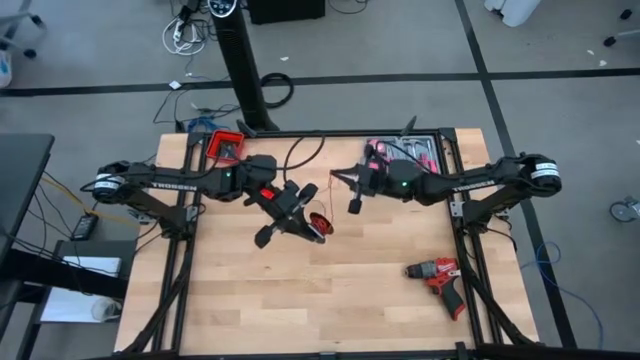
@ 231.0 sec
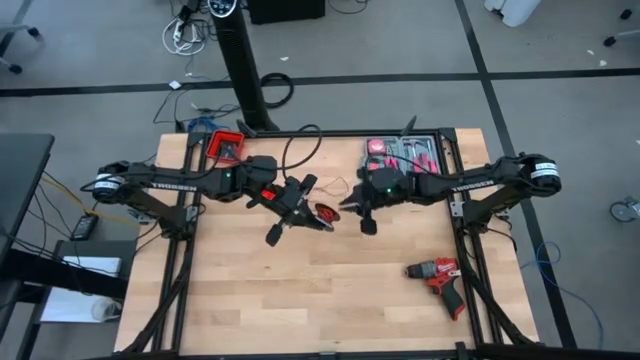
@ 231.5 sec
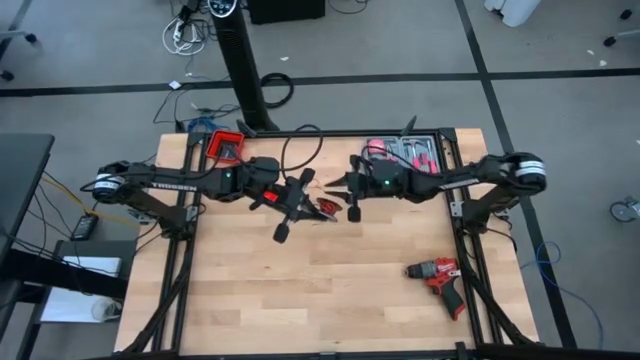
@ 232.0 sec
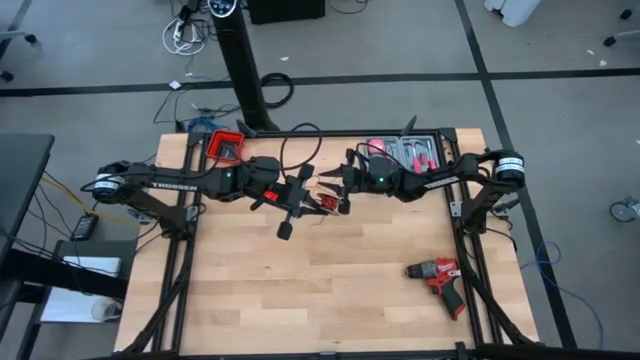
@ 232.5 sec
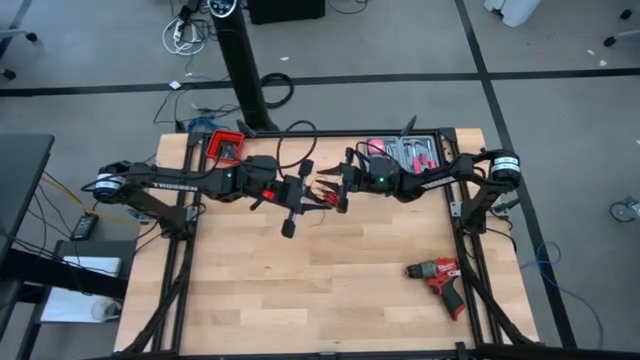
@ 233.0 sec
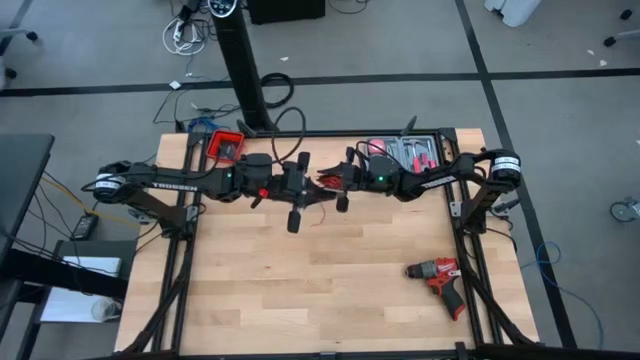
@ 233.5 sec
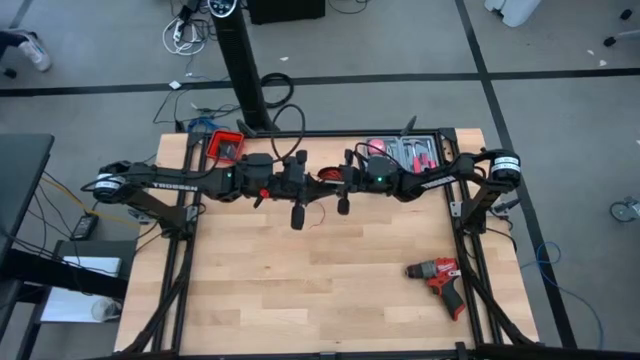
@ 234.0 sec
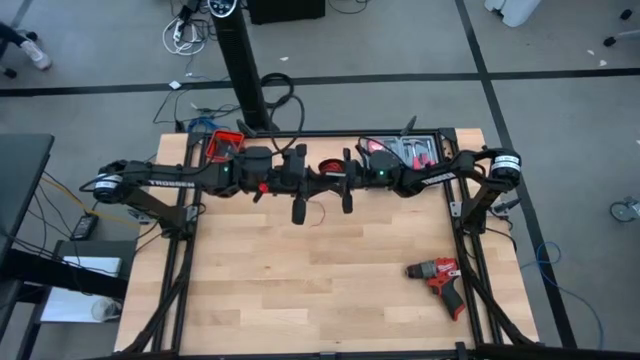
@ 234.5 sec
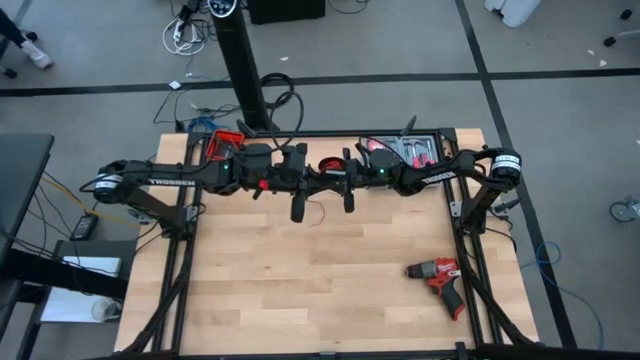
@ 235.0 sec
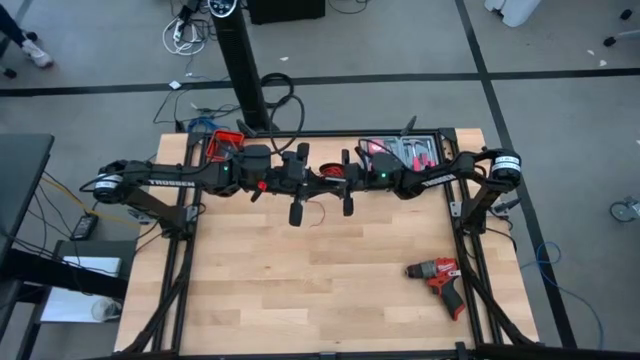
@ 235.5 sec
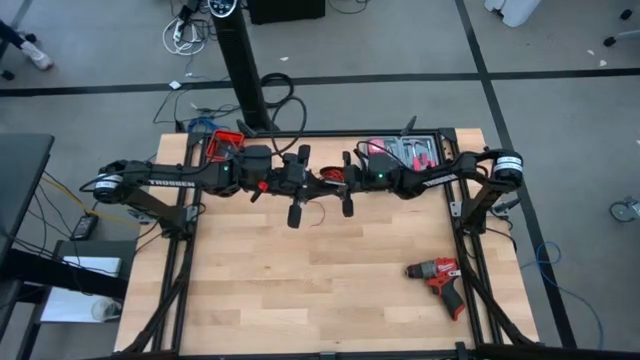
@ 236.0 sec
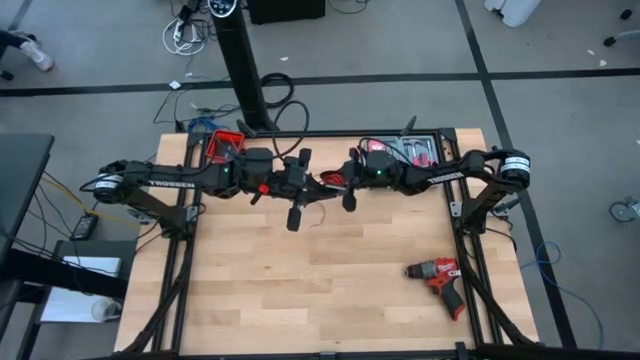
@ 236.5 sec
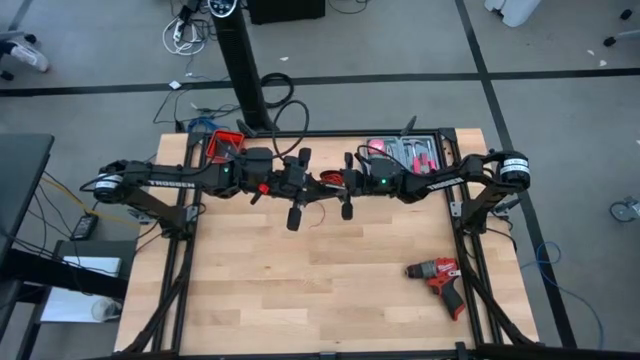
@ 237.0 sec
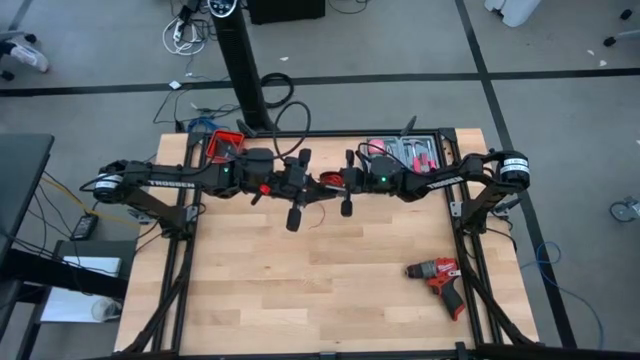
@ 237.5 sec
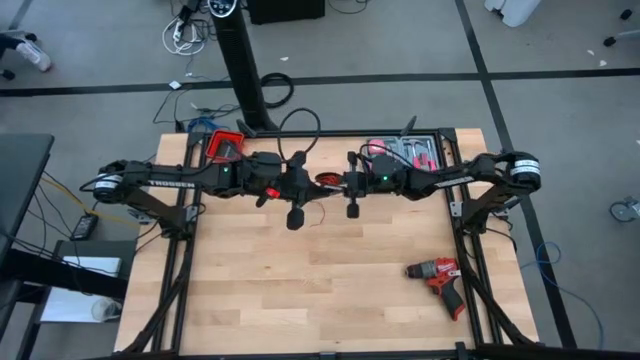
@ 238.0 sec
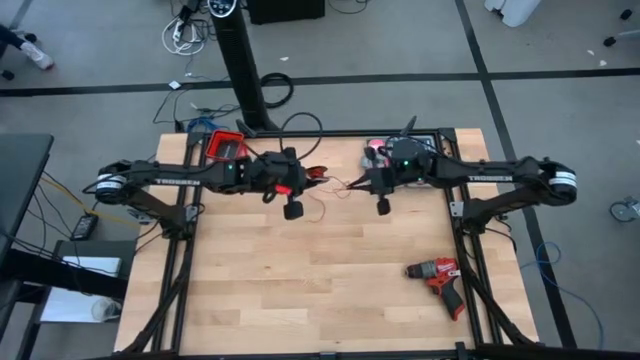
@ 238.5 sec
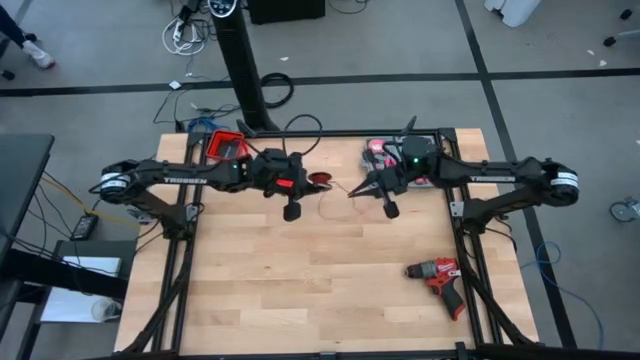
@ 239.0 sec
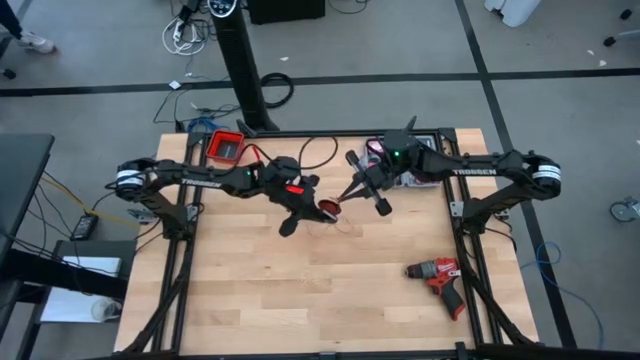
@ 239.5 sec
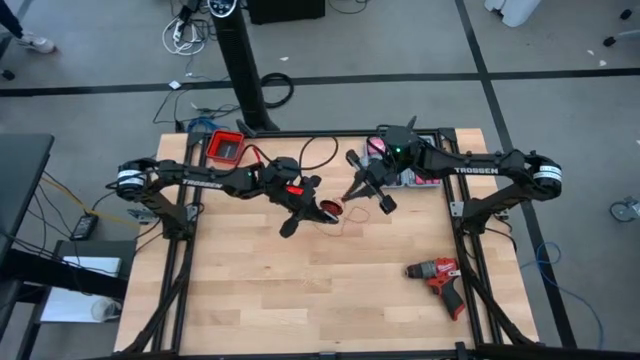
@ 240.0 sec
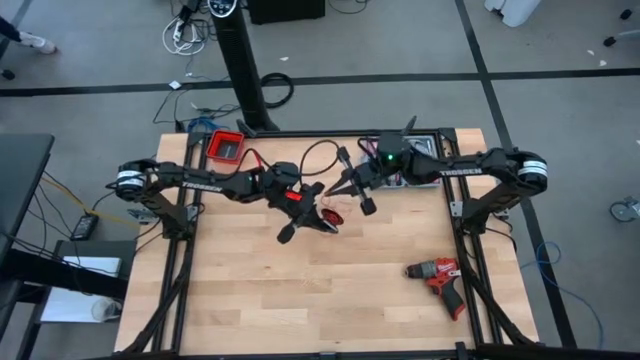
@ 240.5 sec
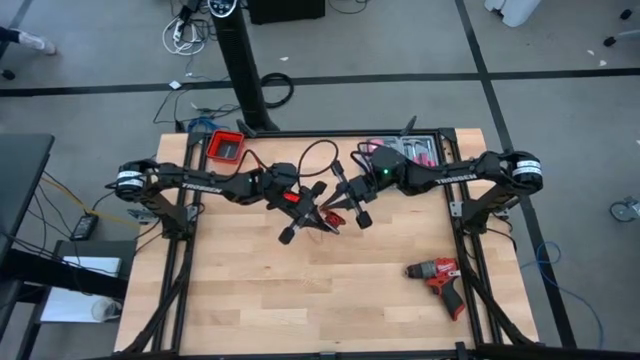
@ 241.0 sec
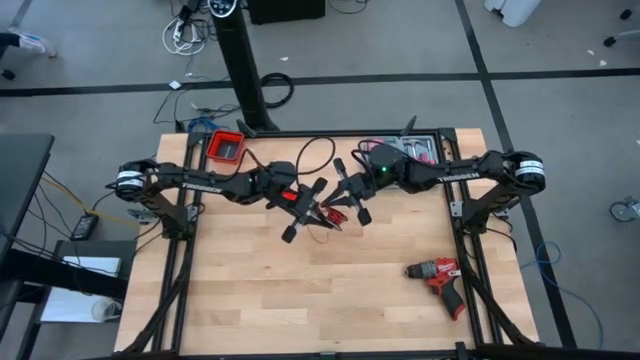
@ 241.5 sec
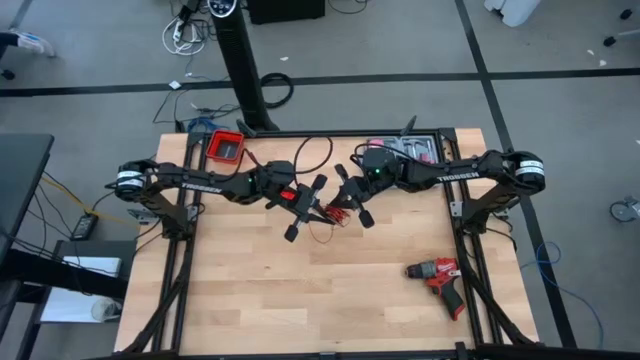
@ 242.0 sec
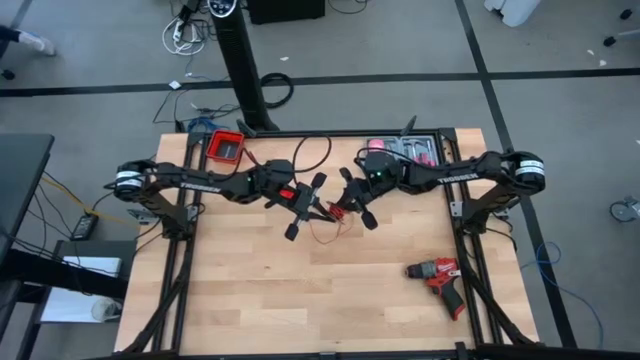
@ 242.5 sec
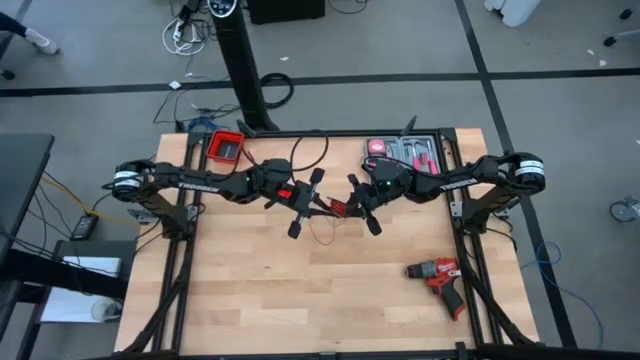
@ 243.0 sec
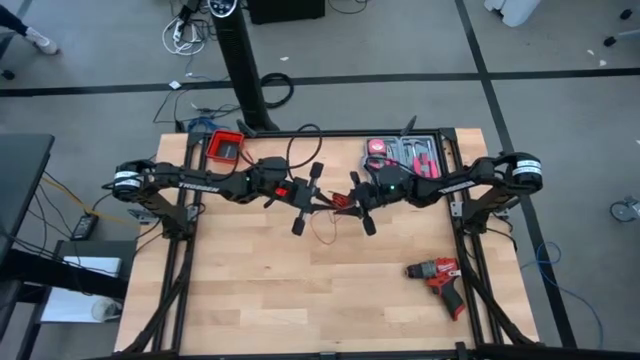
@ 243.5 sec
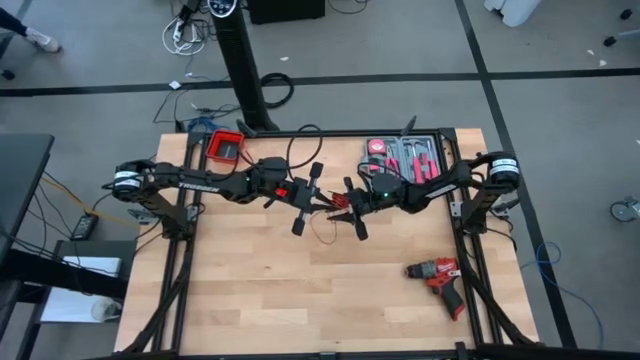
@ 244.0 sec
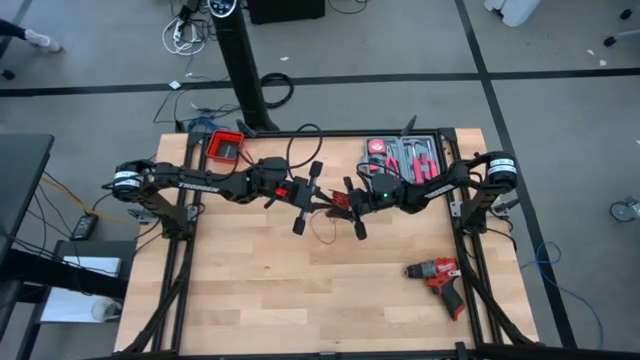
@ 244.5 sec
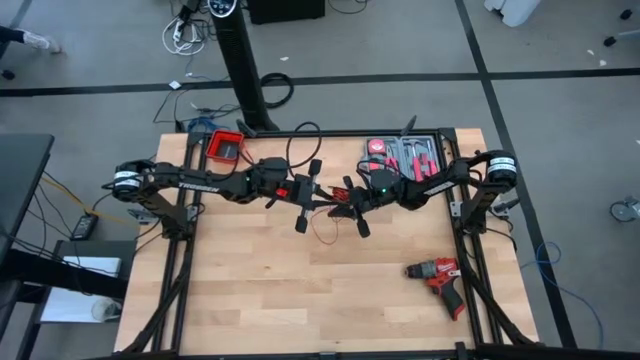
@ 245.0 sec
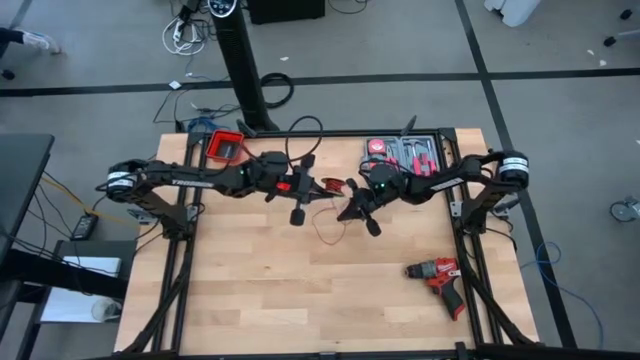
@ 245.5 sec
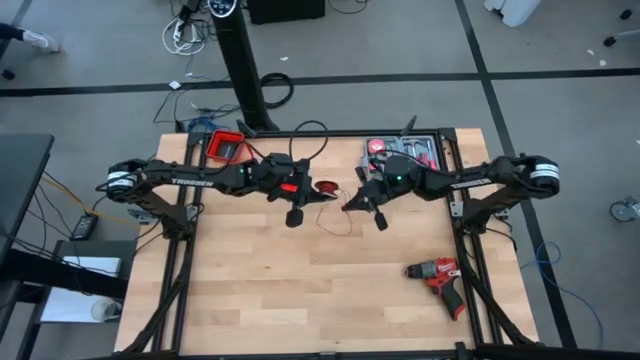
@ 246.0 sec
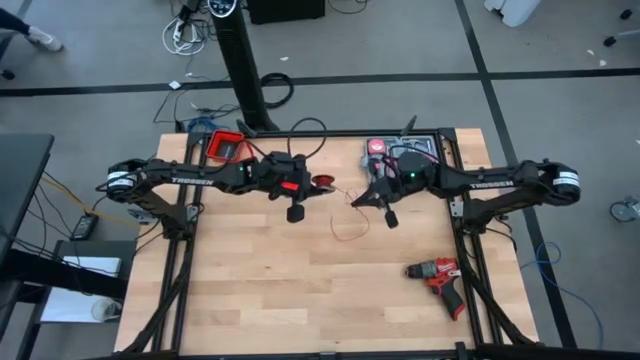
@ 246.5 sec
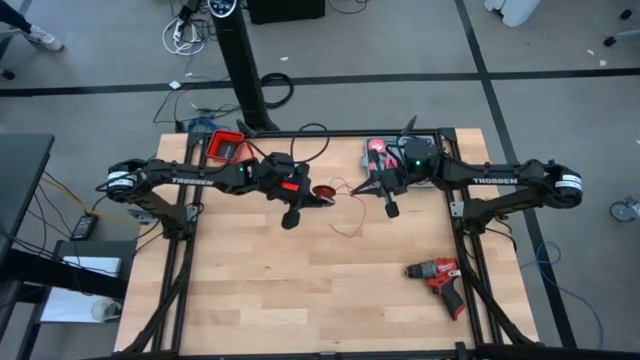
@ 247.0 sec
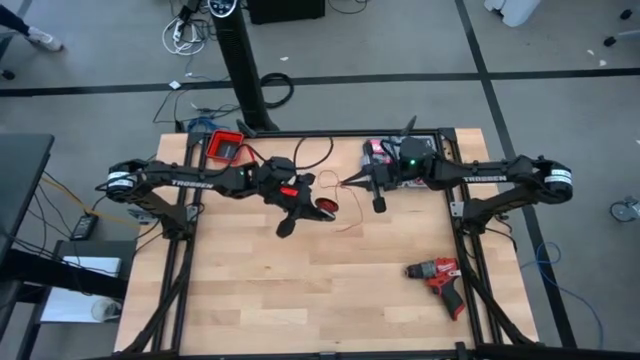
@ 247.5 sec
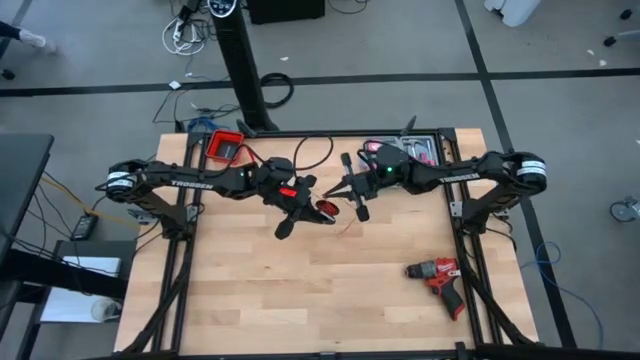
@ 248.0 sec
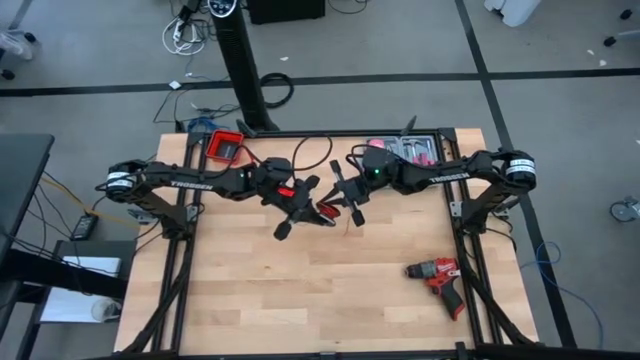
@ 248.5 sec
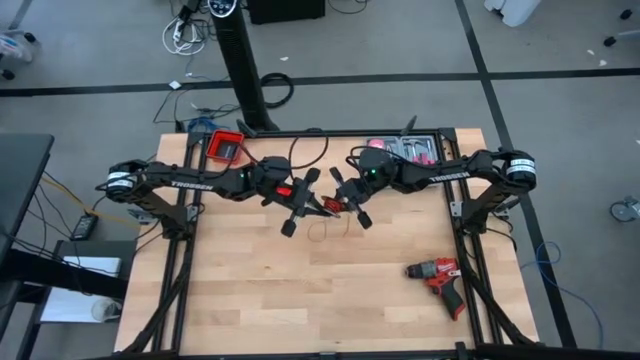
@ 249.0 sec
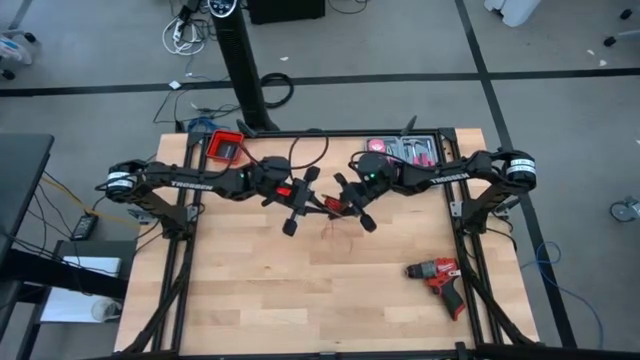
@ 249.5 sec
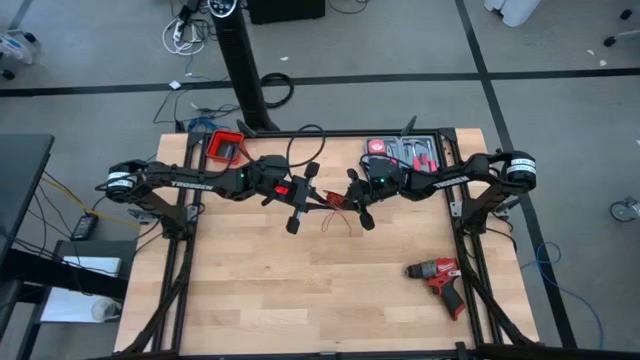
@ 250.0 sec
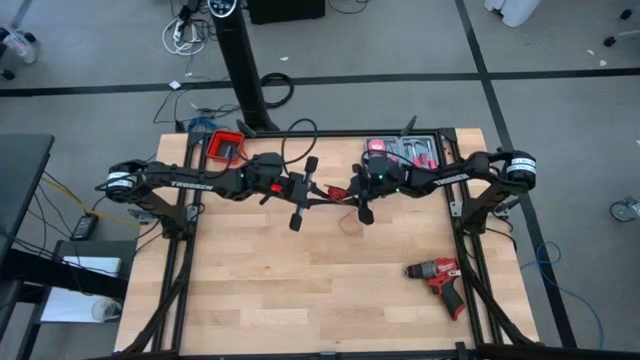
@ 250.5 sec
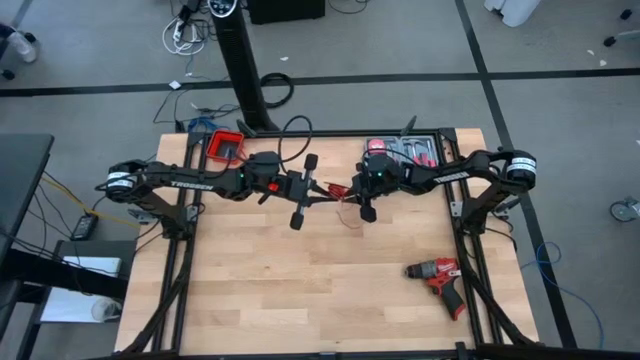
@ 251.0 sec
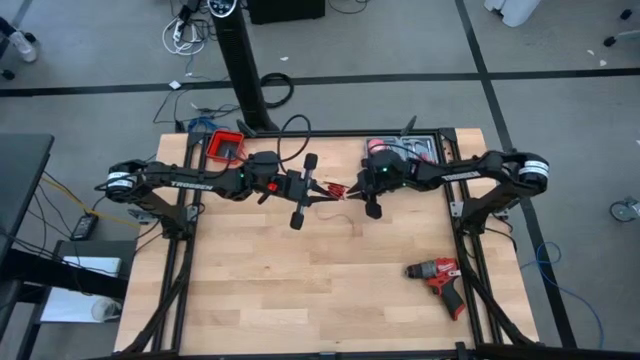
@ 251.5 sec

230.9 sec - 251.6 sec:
Task: Coil cords
Coil the red wire onto the black spool
